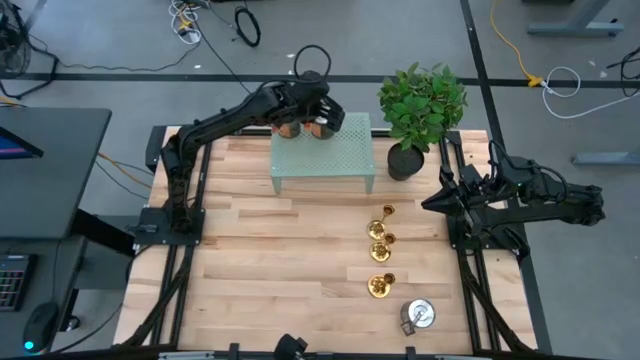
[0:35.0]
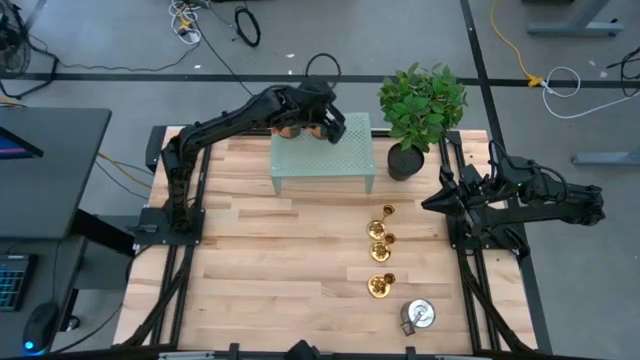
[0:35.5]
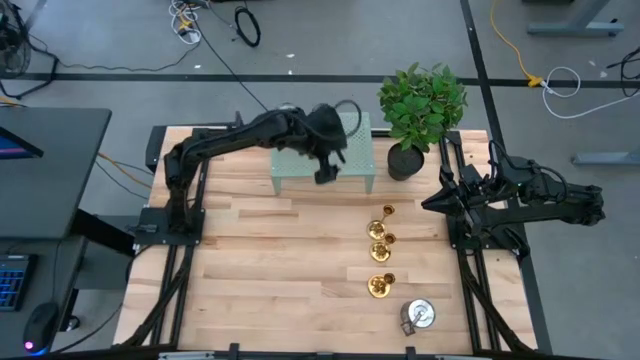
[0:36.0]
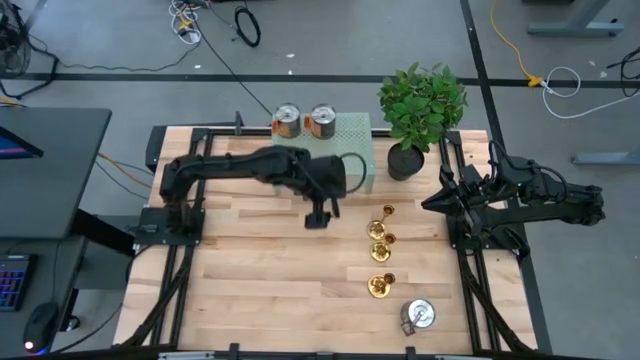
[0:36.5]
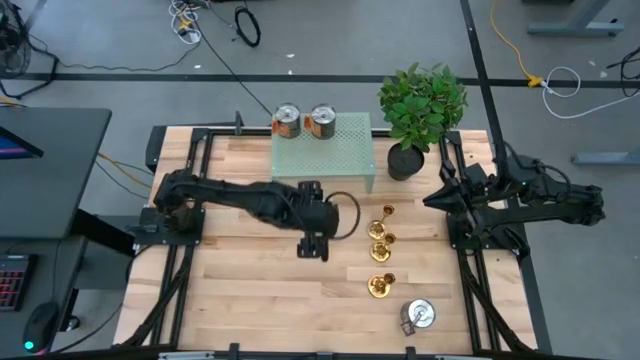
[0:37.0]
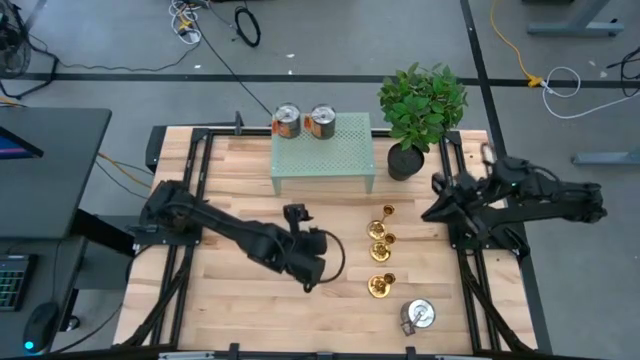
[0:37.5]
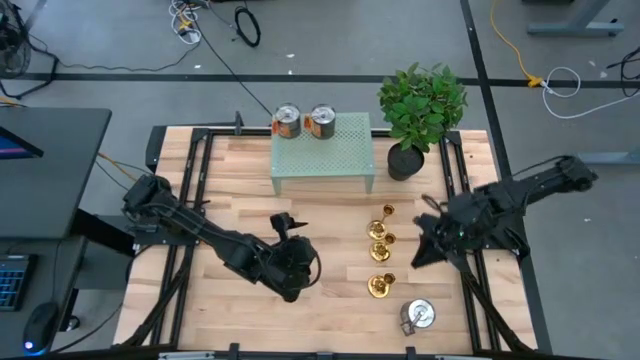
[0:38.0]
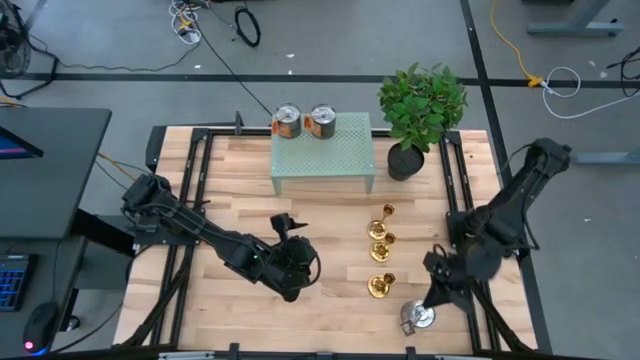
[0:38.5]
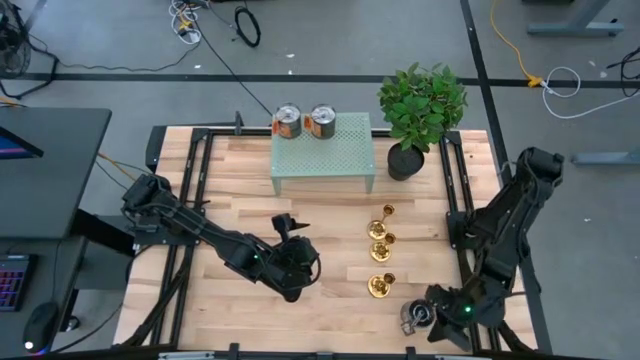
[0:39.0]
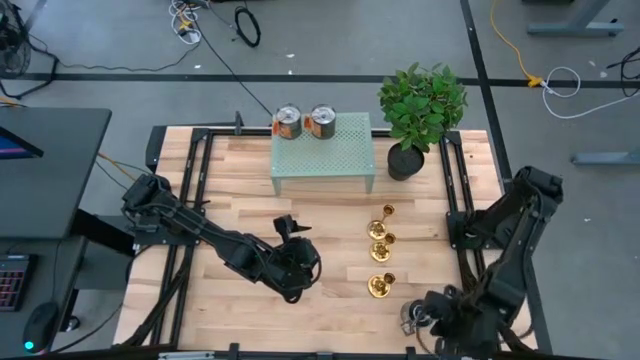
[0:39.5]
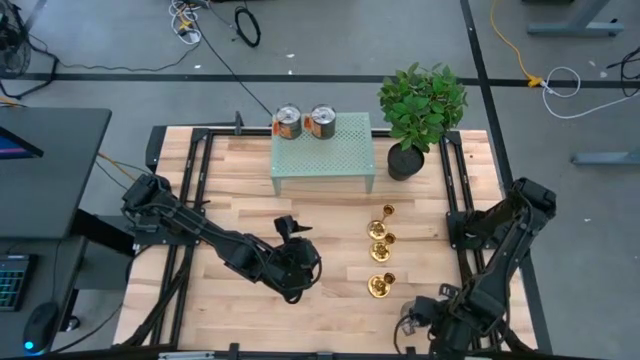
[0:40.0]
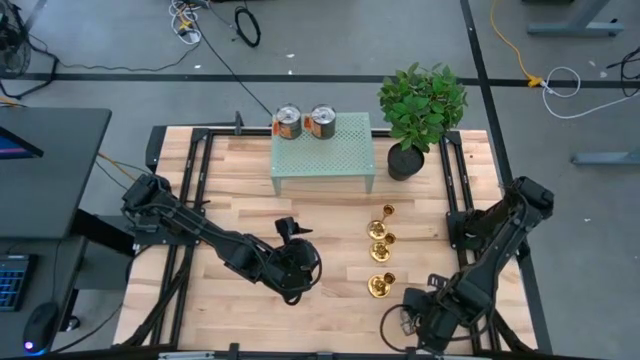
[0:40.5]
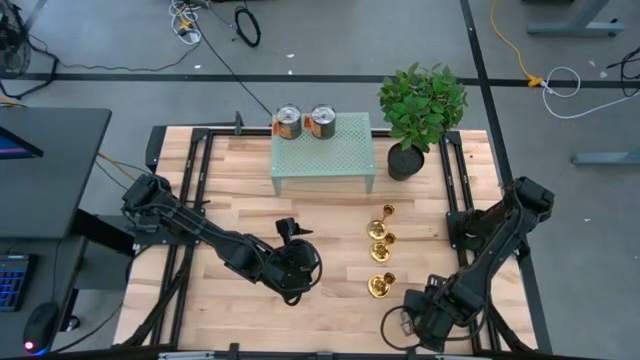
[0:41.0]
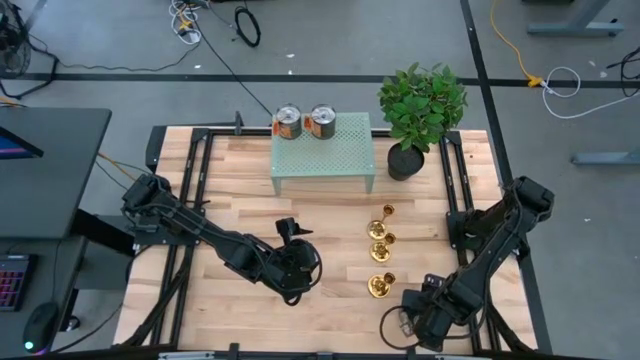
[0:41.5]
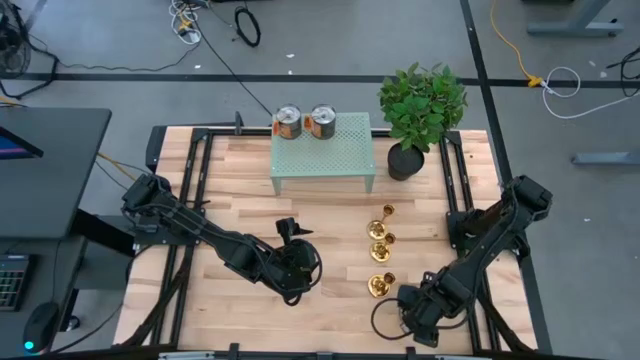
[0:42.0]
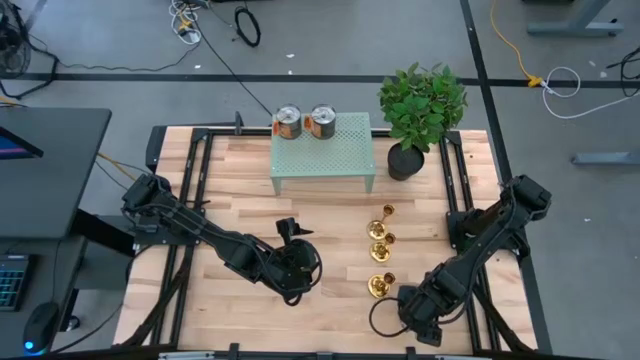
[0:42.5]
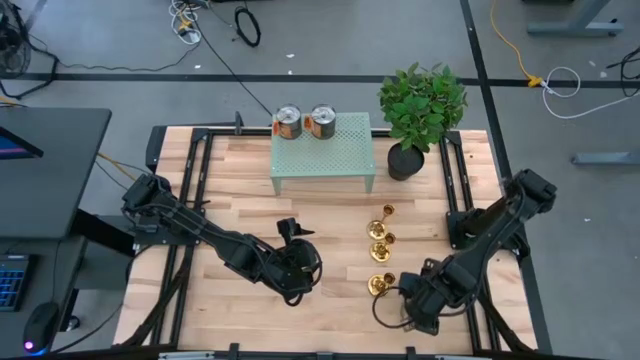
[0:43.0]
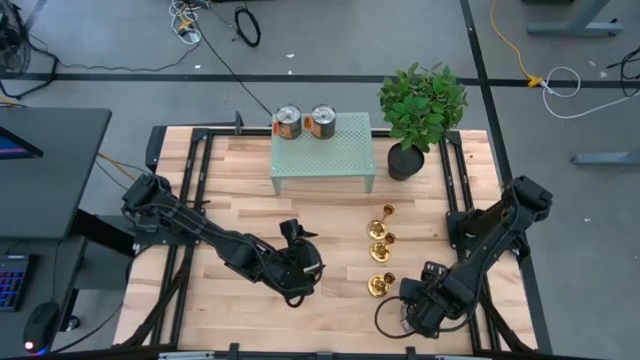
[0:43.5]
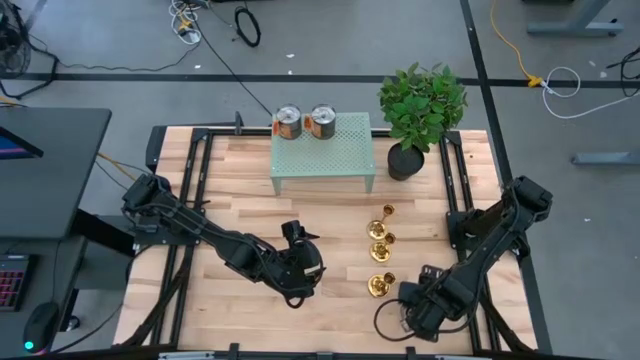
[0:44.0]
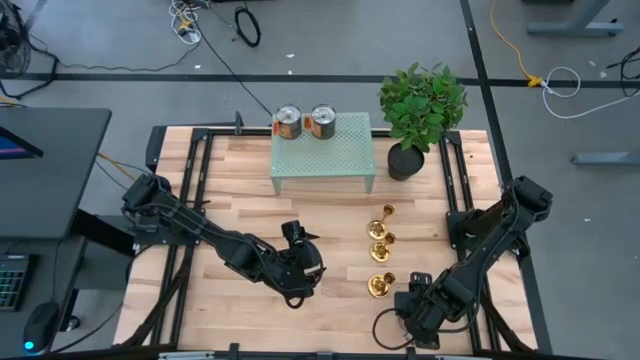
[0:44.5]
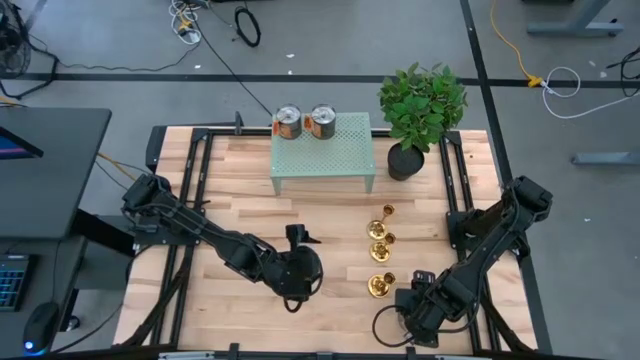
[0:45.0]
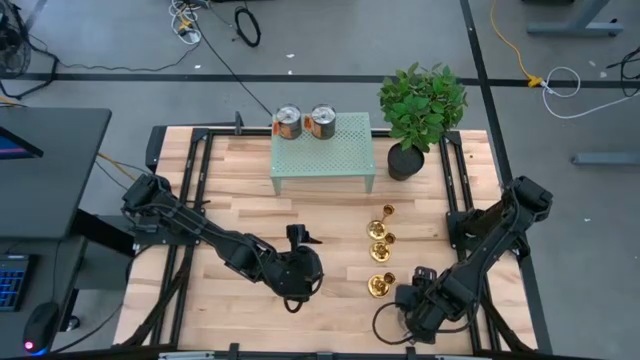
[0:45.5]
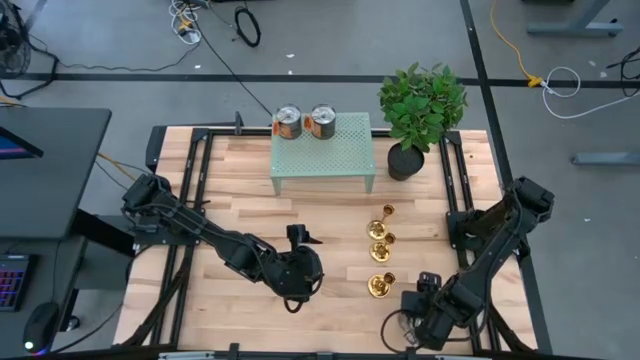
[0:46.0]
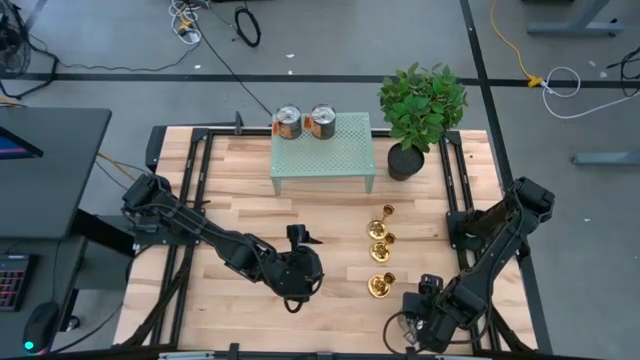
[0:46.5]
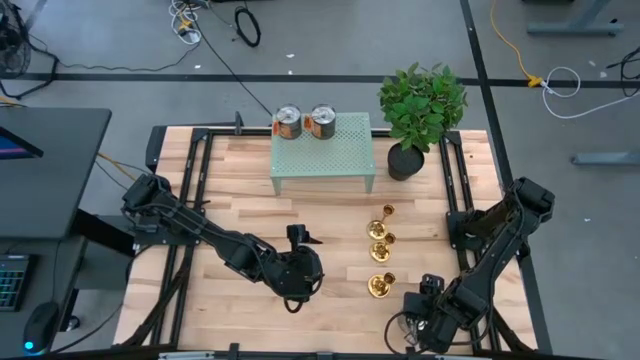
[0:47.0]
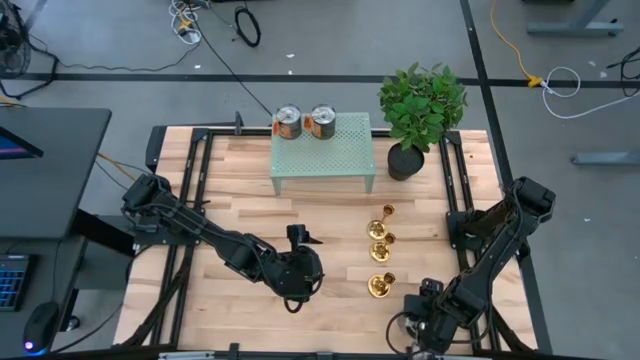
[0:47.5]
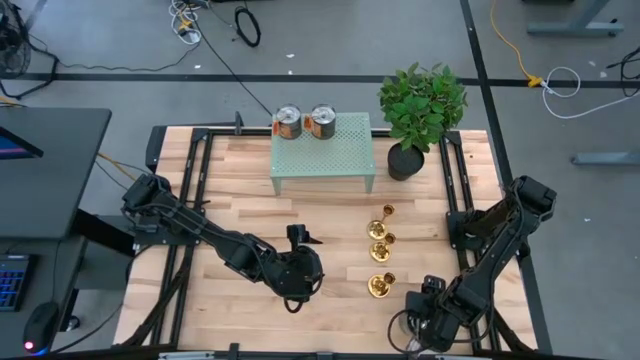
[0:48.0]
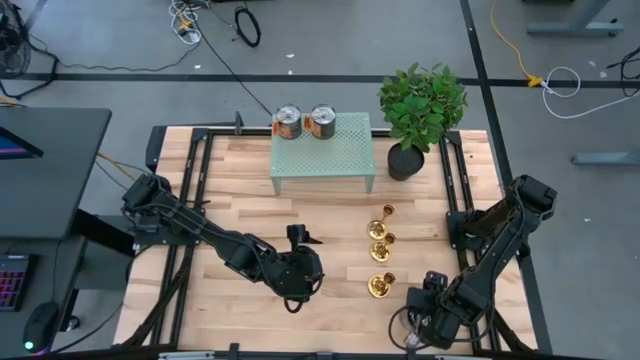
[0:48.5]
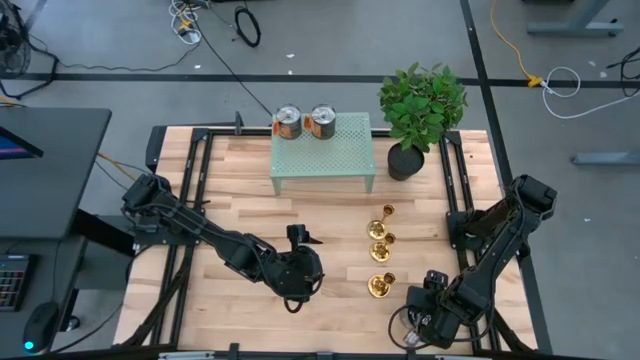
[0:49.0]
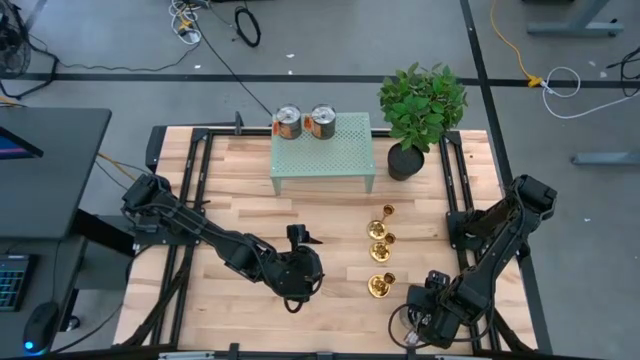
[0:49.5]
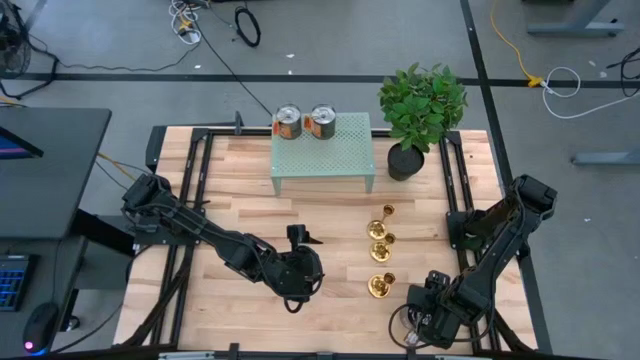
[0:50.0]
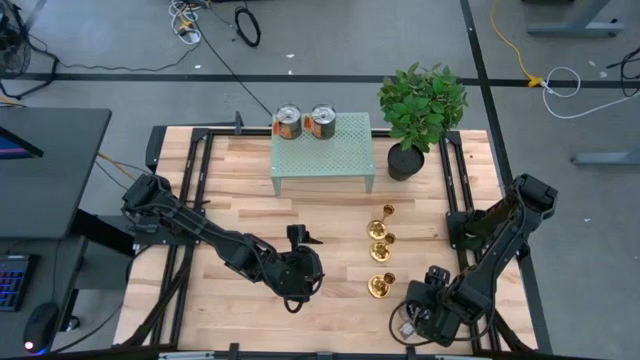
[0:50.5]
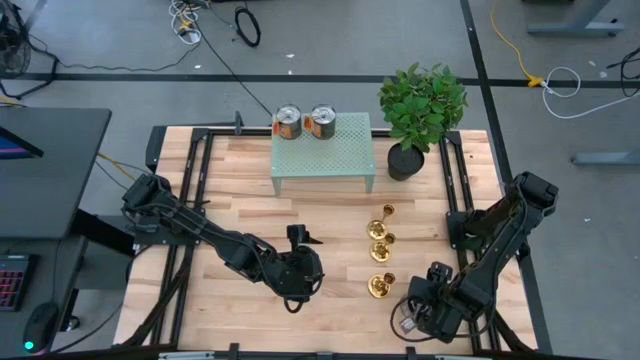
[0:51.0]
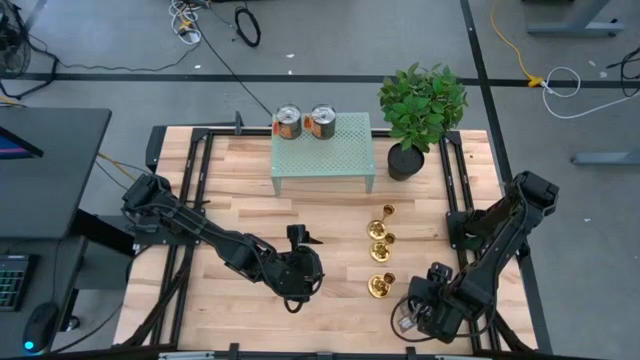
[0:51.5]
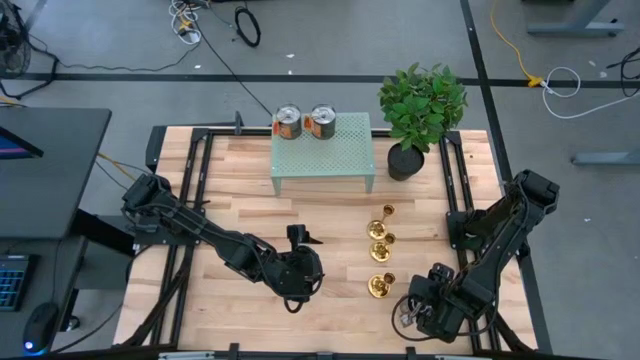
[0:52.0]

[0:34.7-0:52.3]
Task: Pick & Place candle stick holders
Put the silver scented candle on the shelf aligned with the other silver scented candles

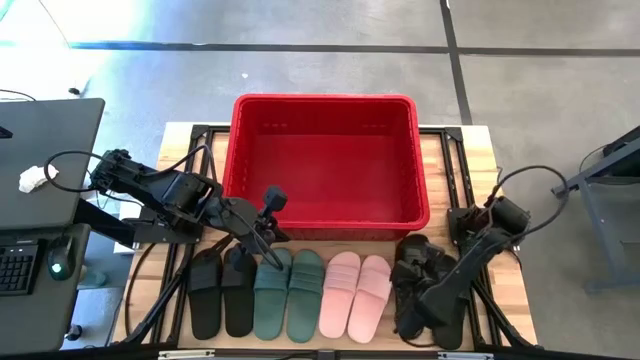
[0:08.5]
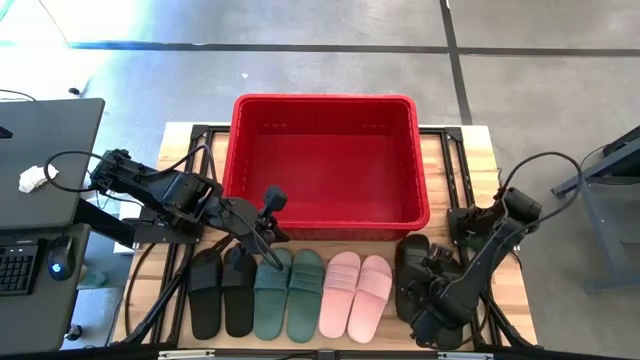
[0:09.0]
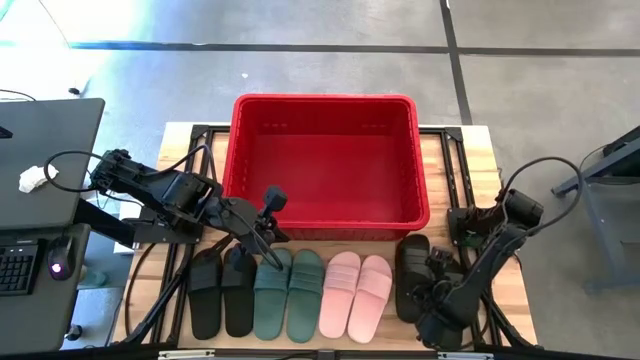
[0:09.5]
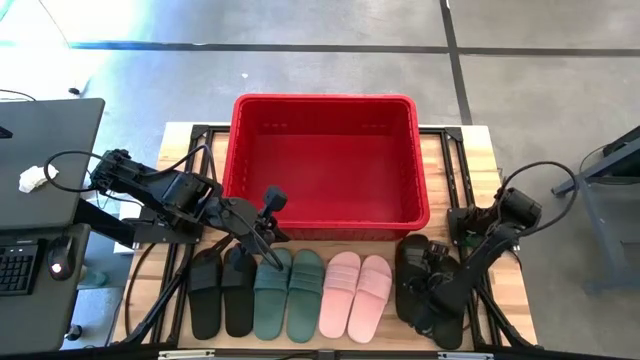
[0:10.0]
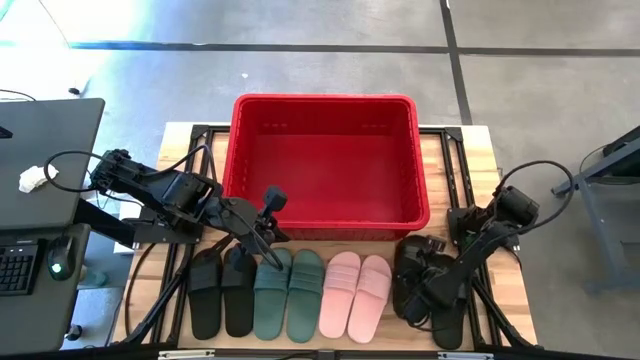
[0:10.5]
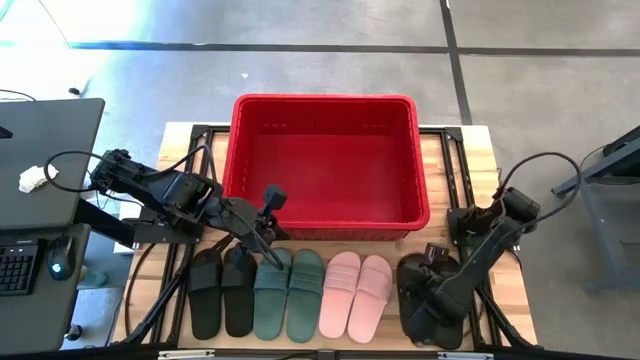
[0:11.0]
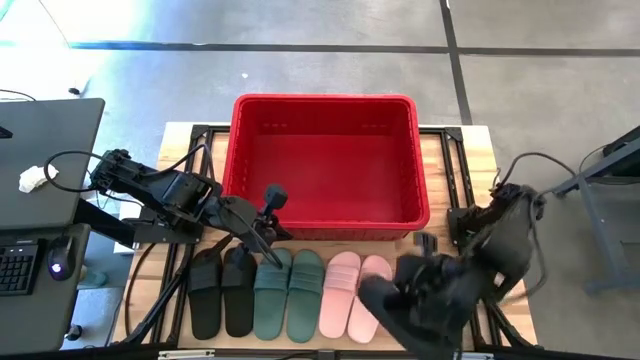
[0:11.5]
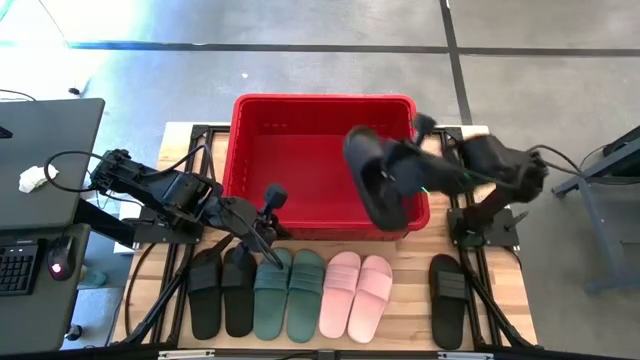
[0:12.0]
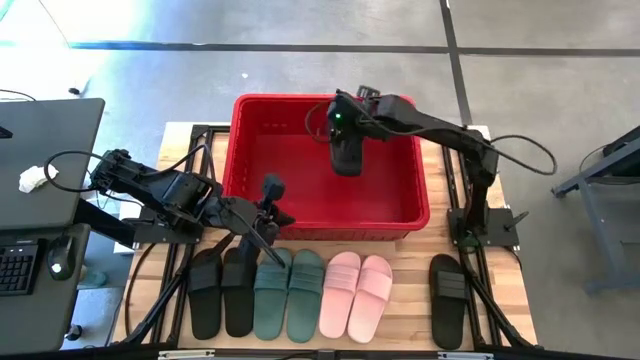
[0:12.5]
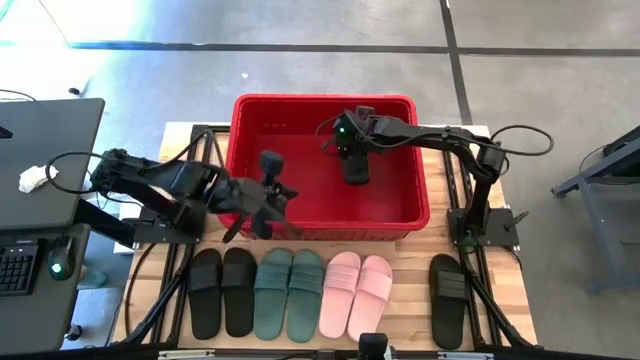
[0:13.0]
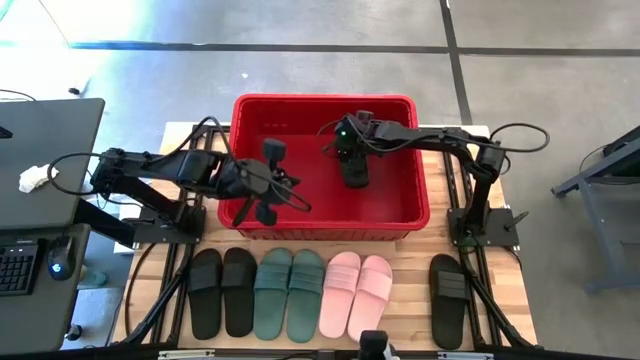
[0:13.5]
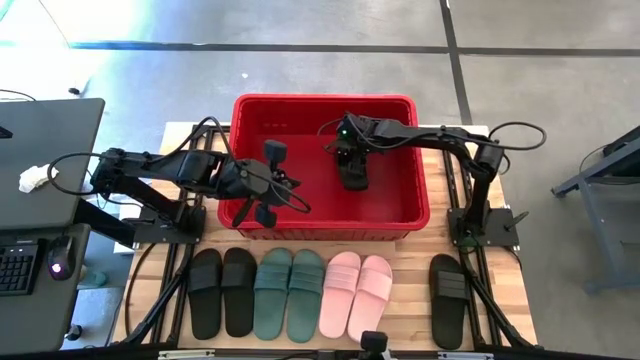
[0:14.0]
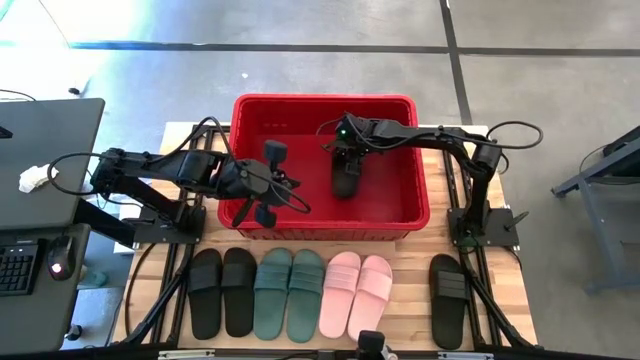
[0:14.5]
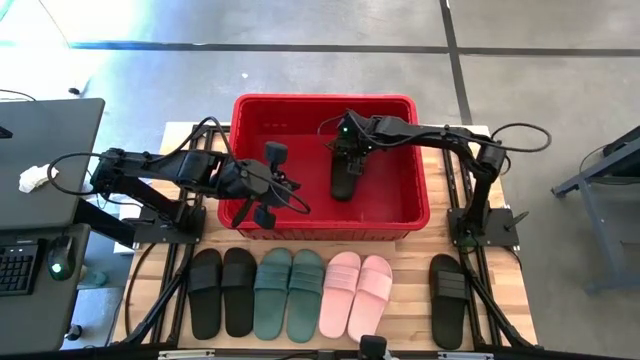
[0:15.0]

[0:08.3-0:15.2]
Task: Pick and place slides into bin
Put the black slide into the red bin
